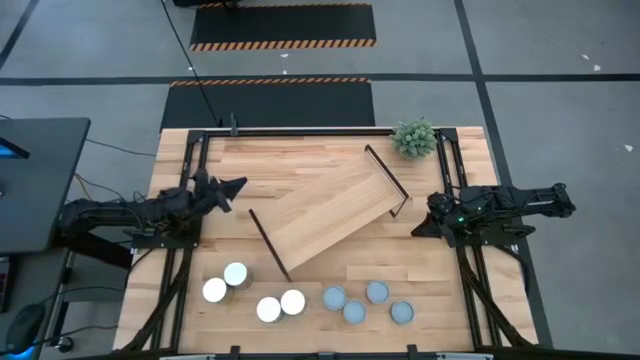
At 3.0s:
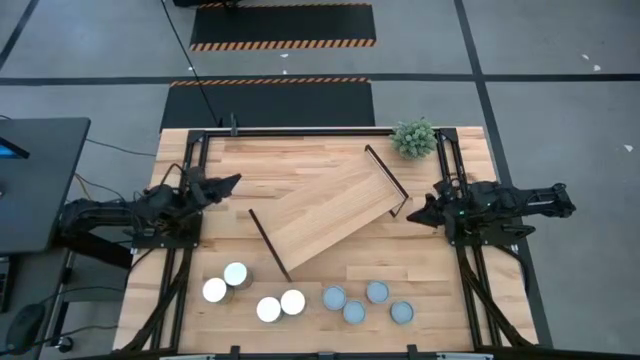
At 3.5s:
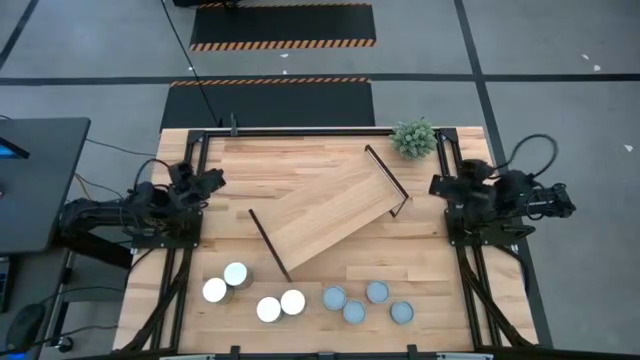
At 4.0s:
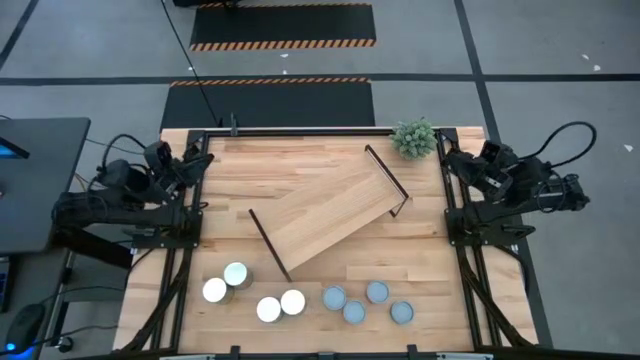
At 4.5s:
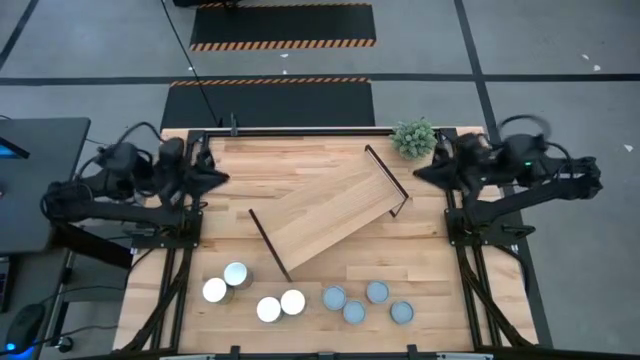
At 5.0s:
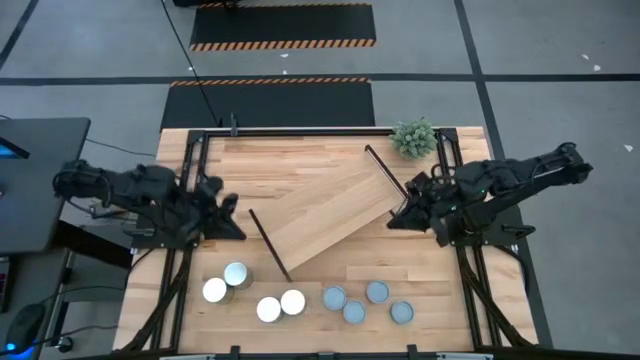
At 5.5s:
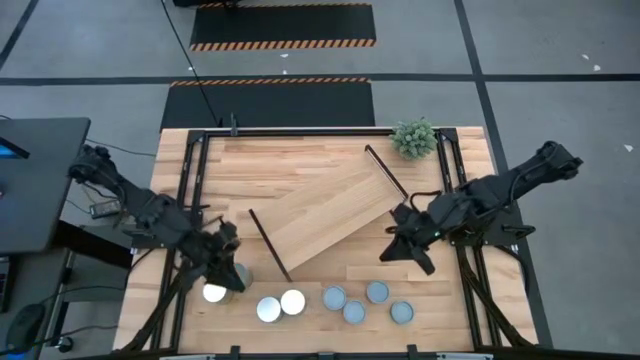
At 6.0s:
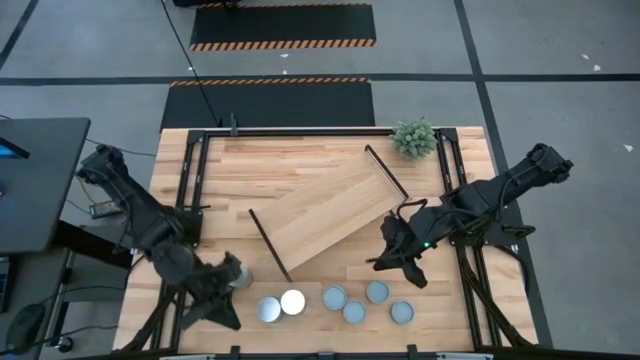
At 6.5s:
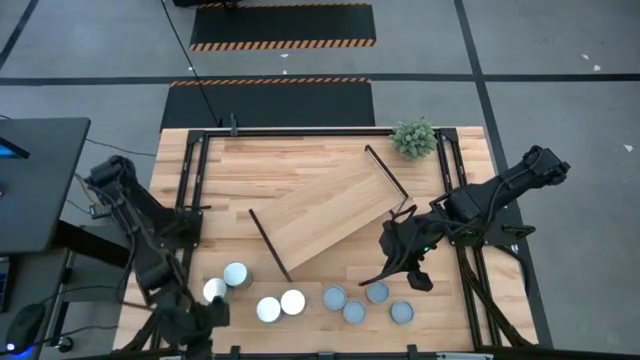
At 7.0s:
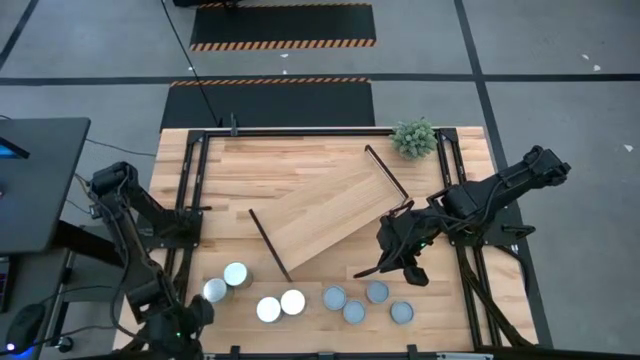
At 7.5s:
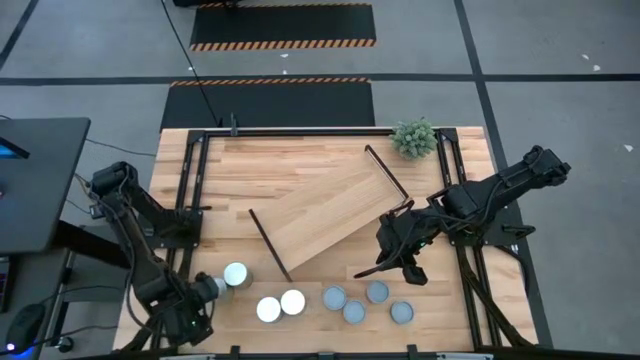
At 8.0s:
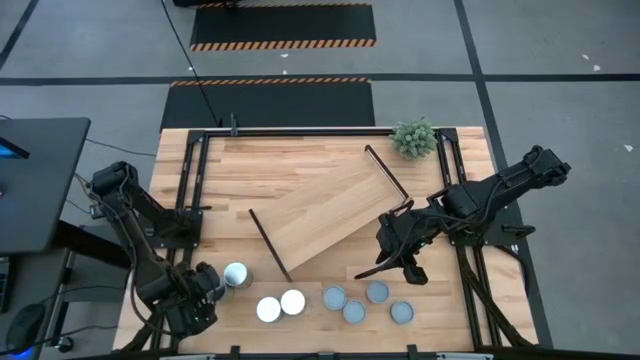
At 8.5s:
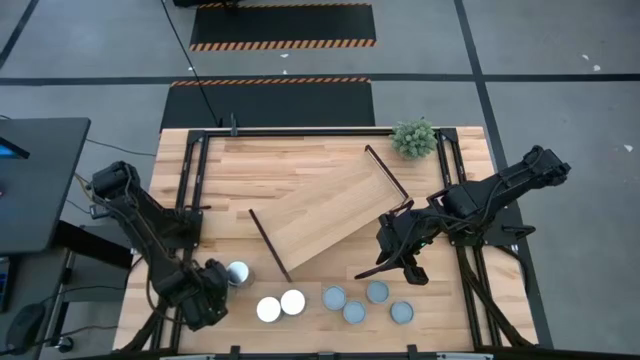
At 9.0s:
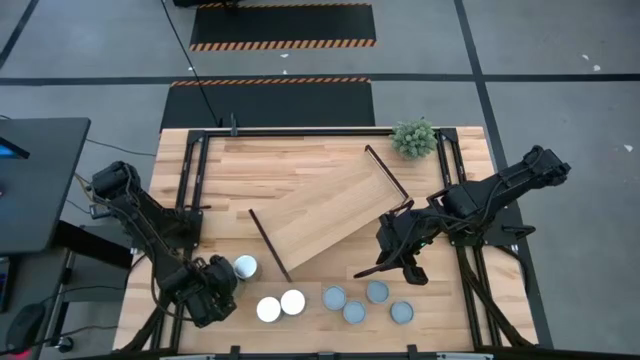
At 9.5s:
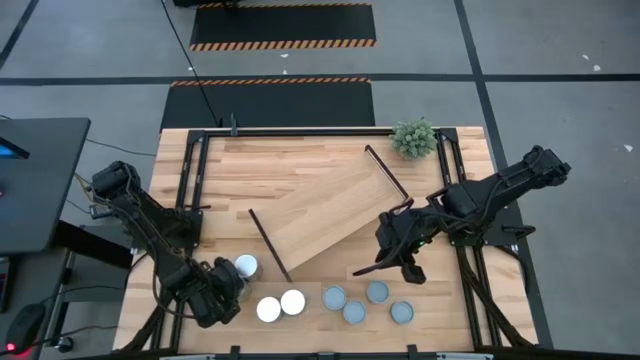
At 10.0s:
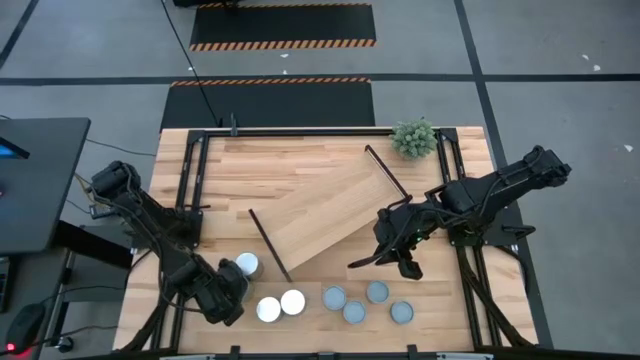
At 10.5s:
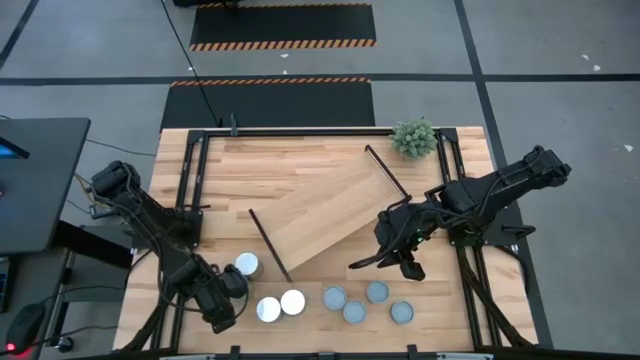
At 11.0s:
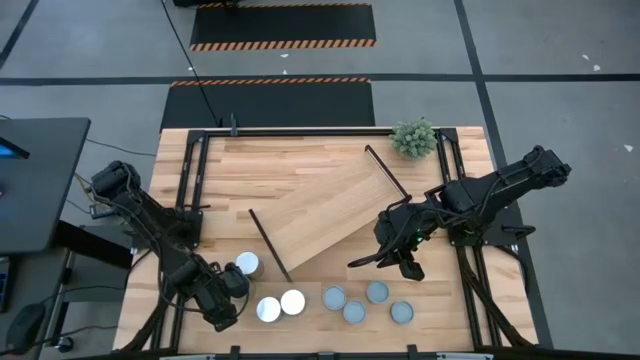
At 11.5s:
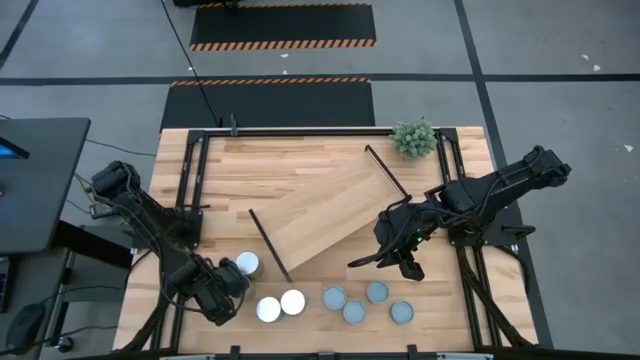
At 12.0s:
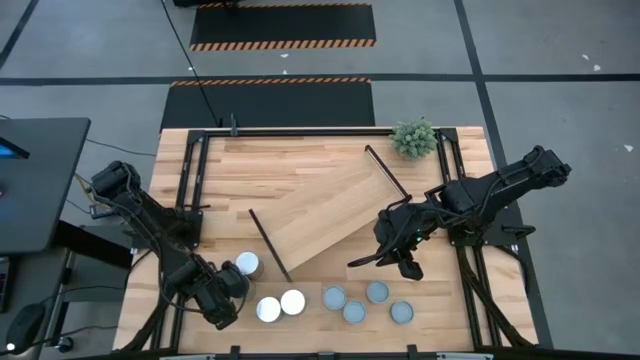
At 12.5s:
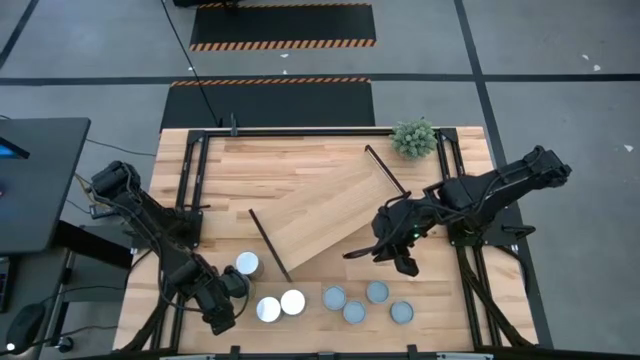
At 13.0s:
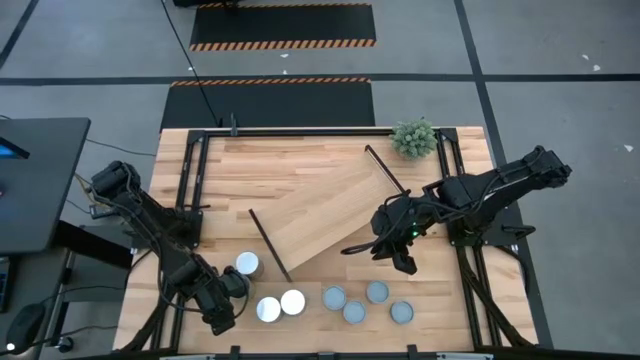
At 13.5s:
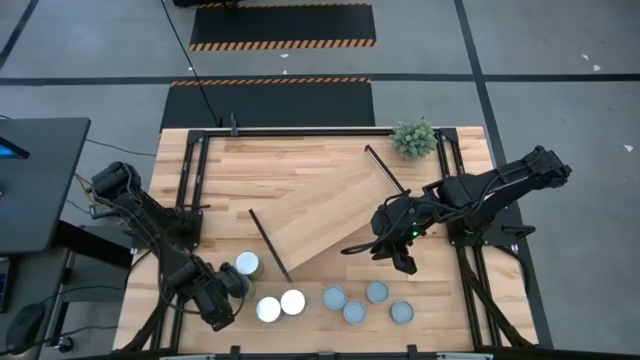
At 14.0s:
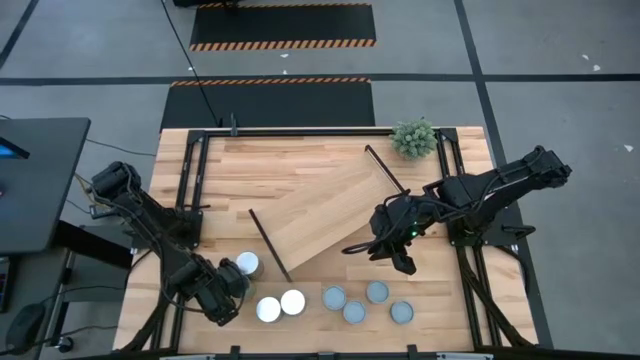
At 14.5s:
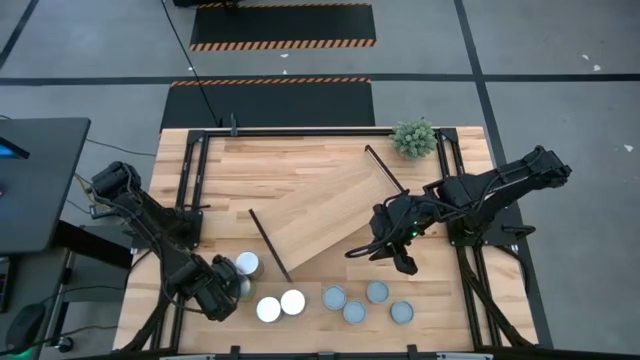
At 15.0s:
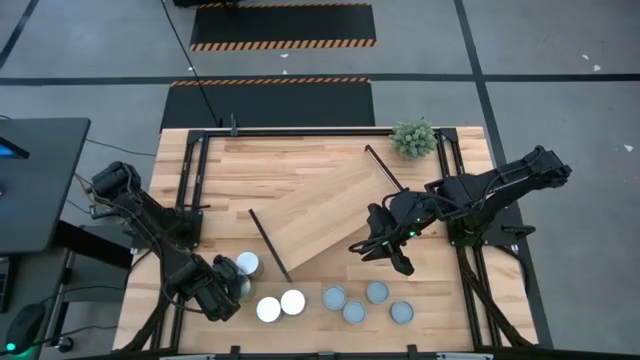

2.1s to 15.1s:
Task: Pick and place cans onto a shelf
Put the canned carrots on the shelf

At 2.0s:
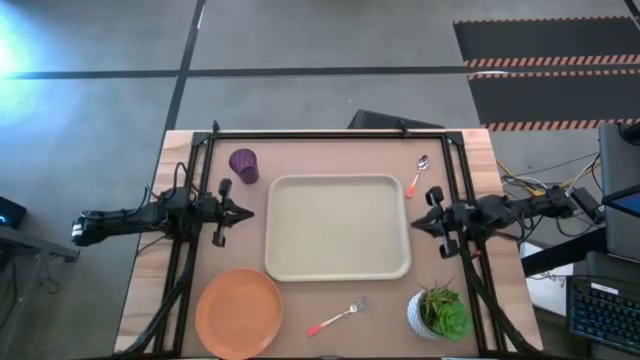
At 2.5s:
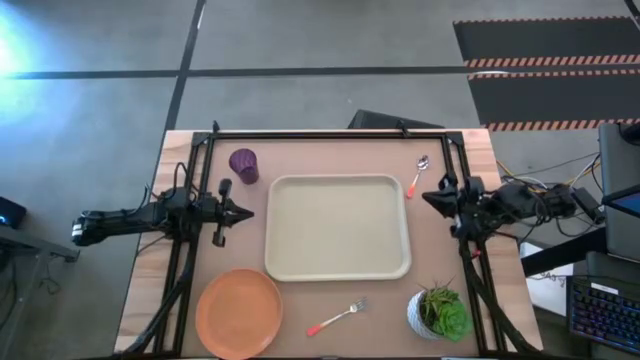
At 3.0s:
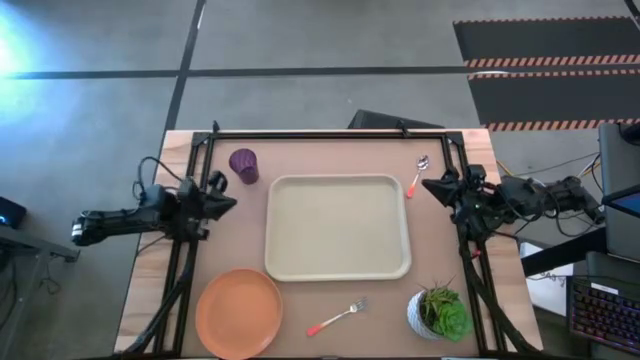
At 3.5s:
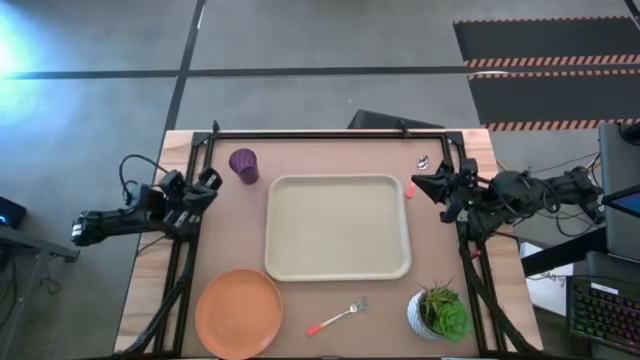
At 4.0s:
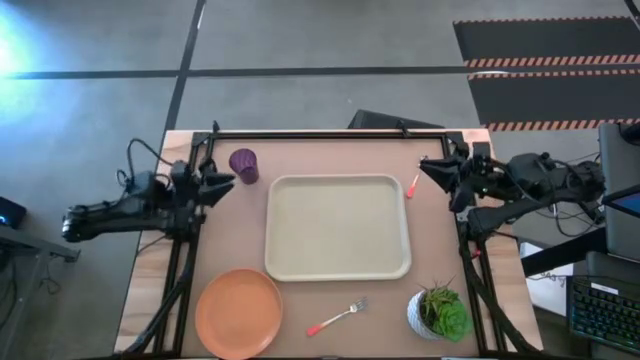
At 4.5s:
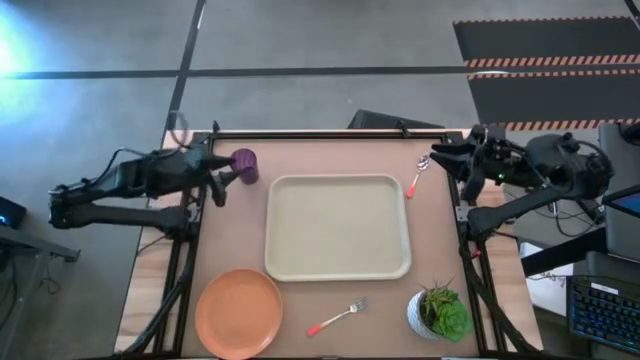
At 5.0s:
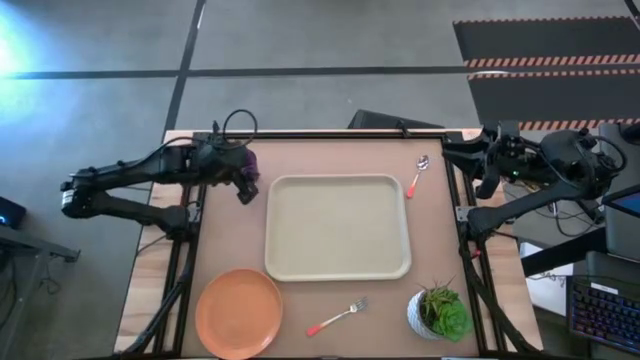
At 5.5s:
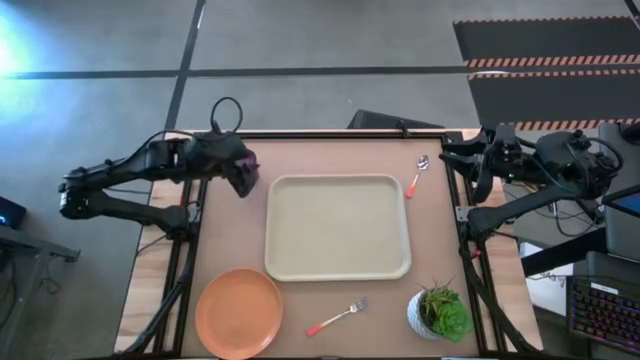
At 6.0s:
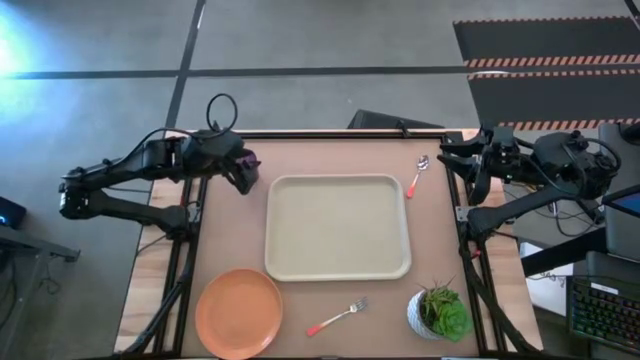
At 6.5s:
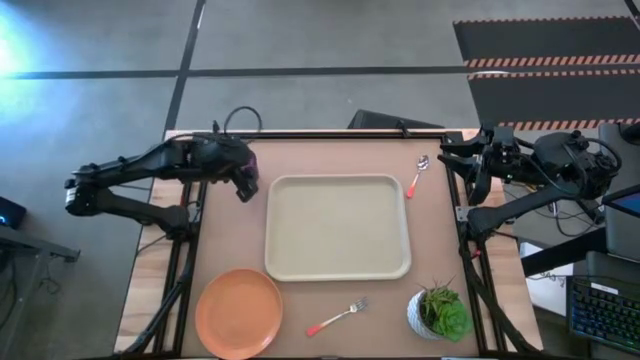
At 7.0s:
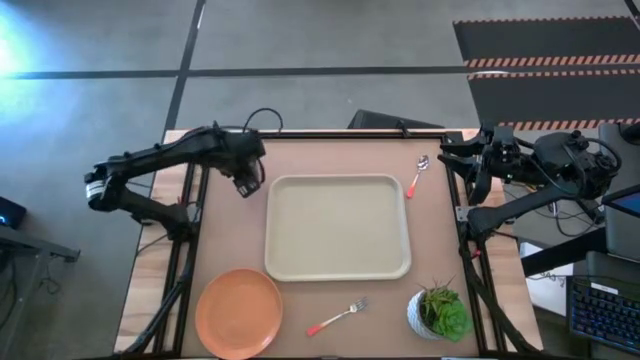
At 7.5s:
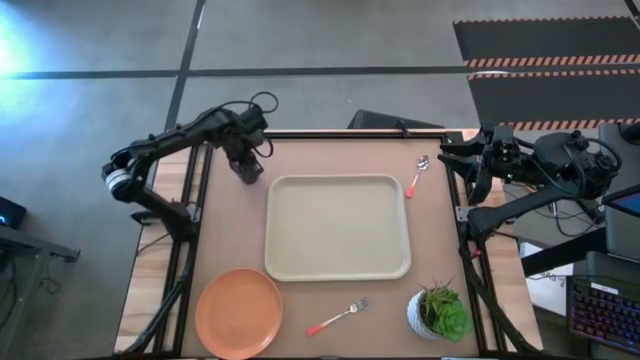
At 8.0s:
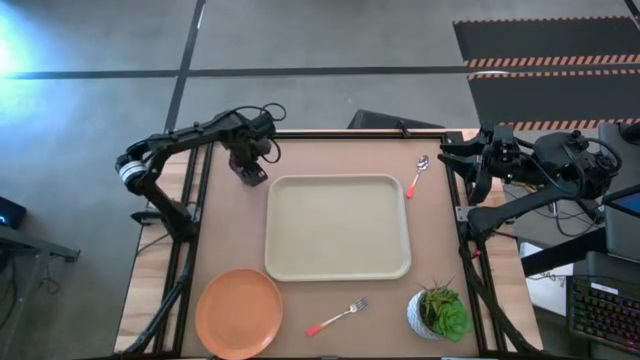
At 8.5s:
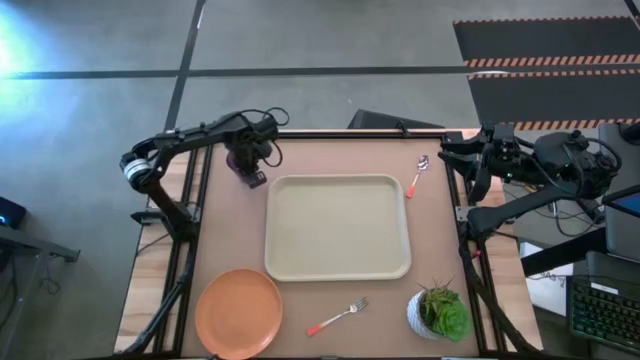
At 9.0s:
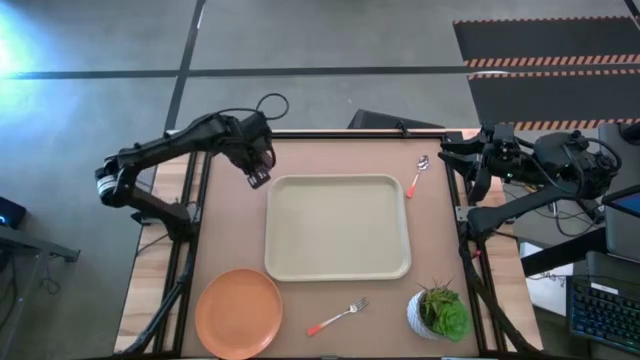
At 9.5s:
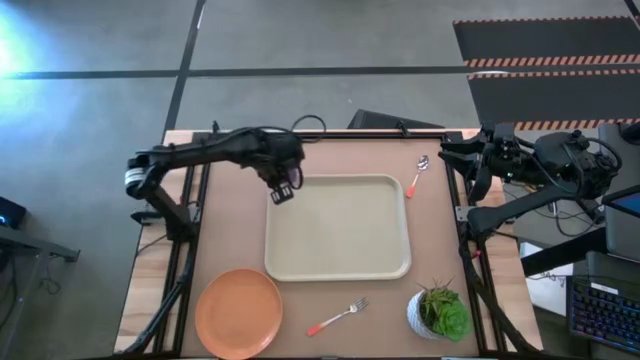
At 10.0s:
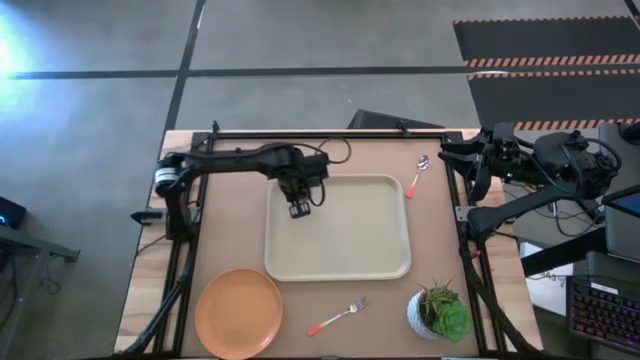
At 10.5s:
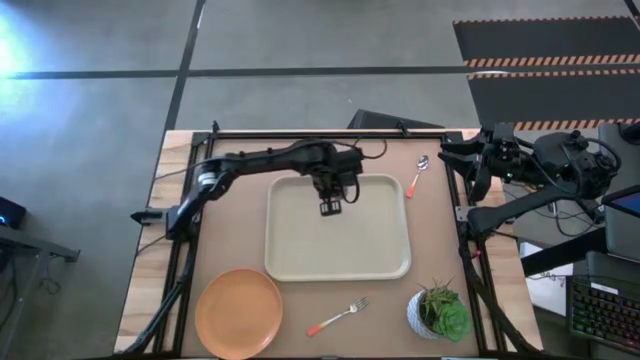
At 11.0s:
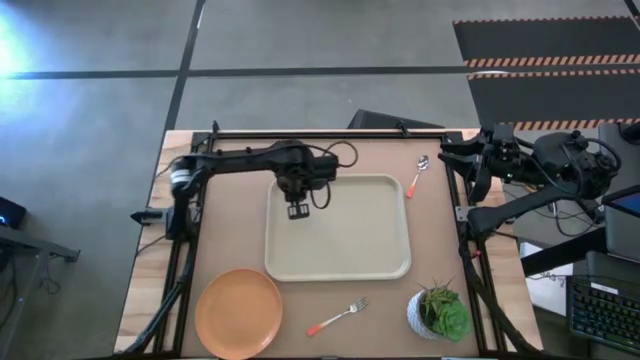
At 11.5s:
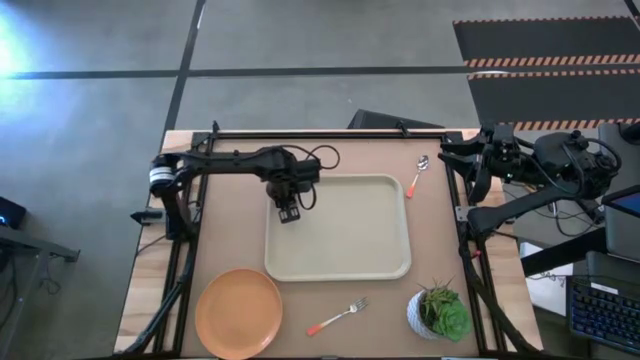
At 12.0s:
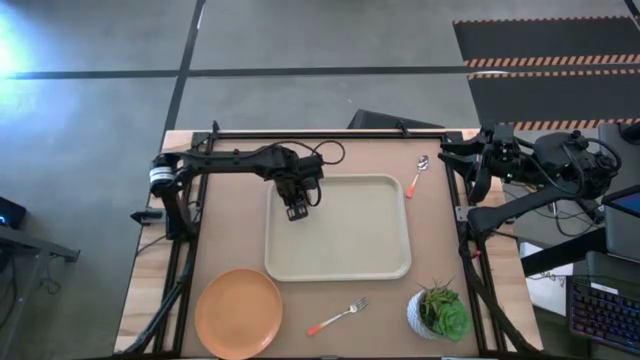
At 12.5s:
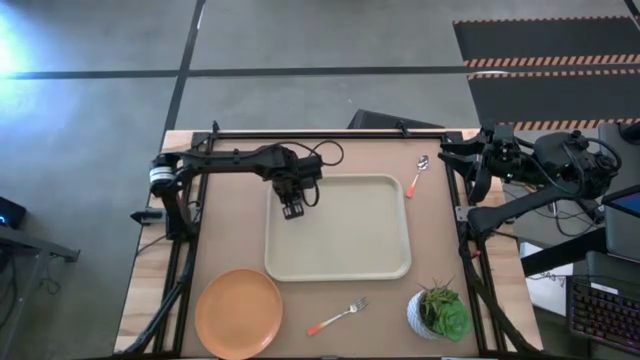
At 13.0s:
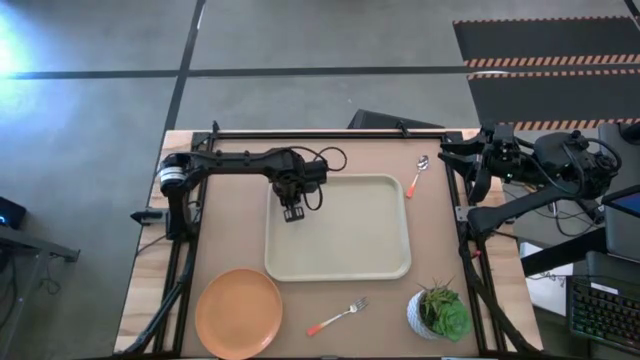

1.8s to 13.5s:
Task: Pick and place plate/cup/fork/spoon on tray
Put the purple cup on the beige tray
